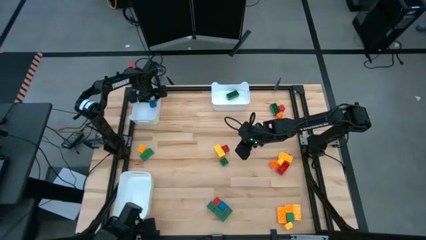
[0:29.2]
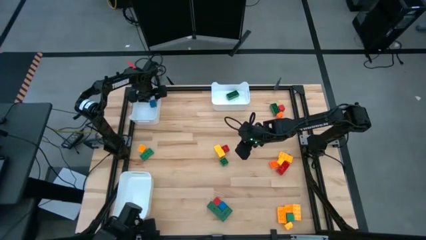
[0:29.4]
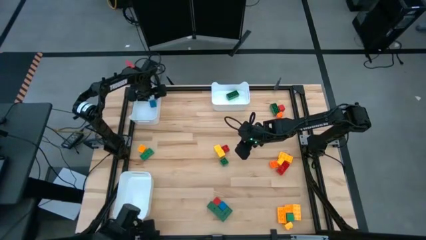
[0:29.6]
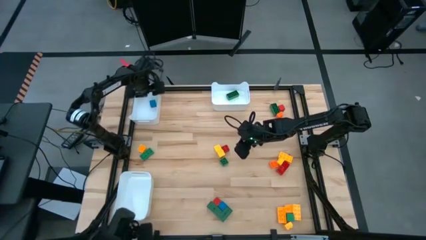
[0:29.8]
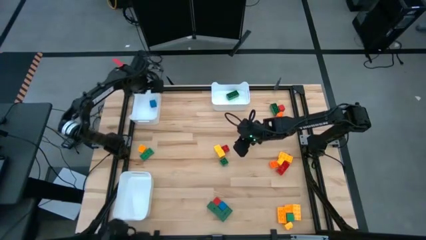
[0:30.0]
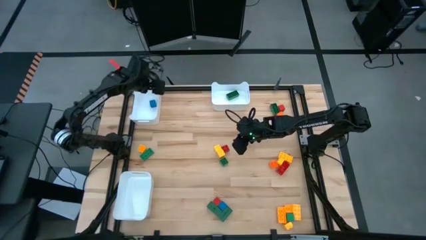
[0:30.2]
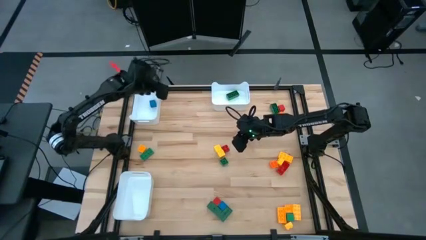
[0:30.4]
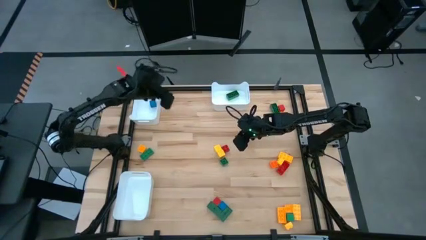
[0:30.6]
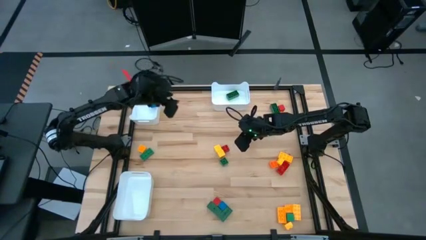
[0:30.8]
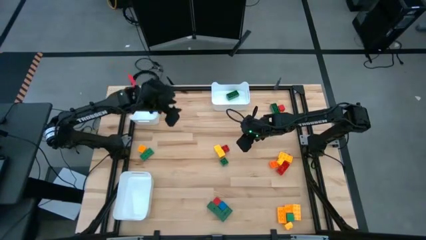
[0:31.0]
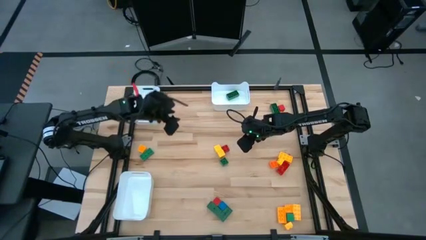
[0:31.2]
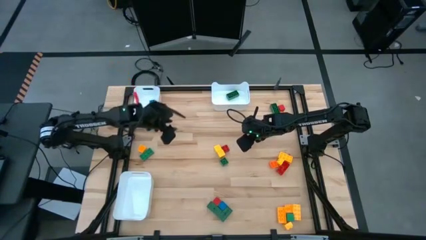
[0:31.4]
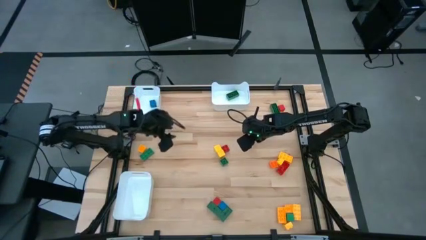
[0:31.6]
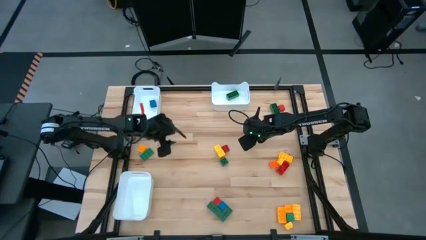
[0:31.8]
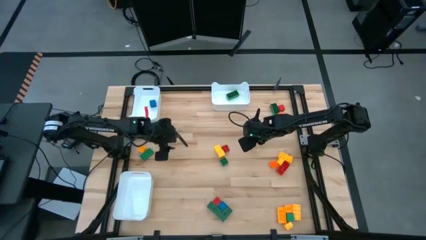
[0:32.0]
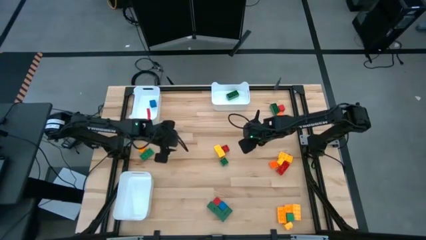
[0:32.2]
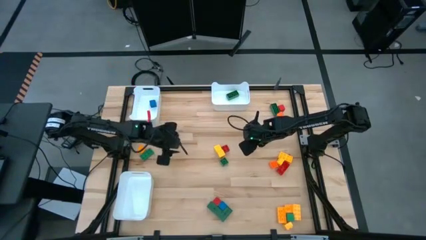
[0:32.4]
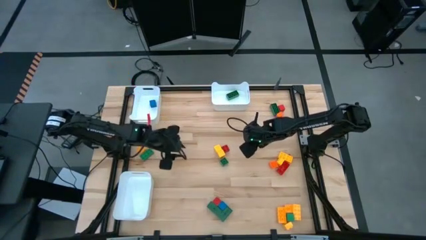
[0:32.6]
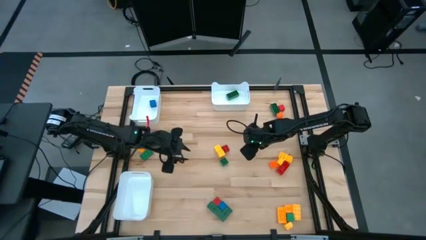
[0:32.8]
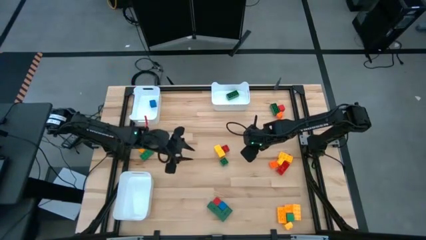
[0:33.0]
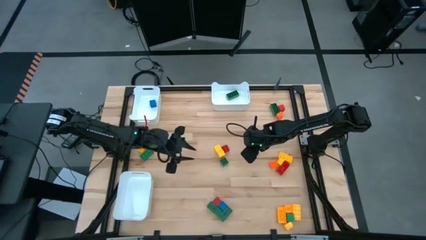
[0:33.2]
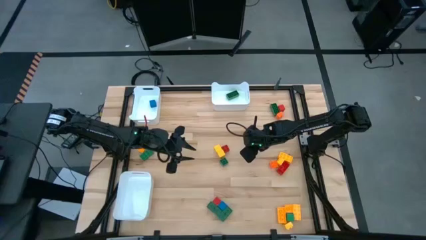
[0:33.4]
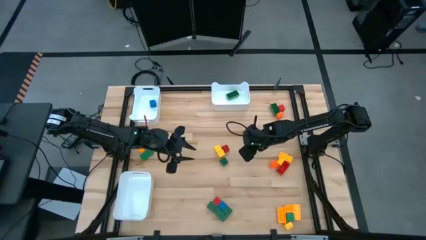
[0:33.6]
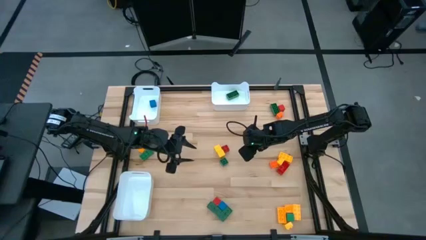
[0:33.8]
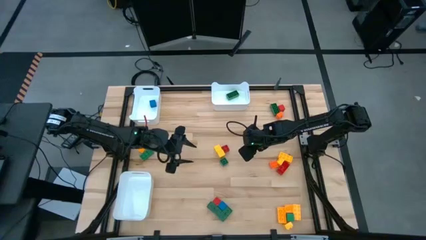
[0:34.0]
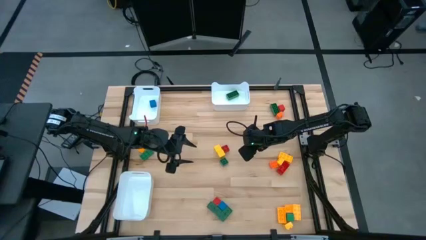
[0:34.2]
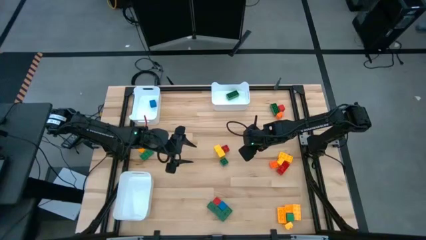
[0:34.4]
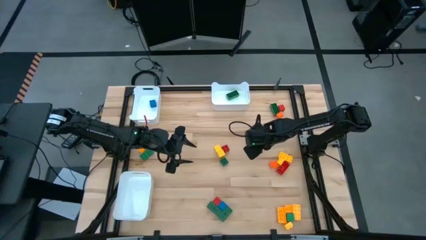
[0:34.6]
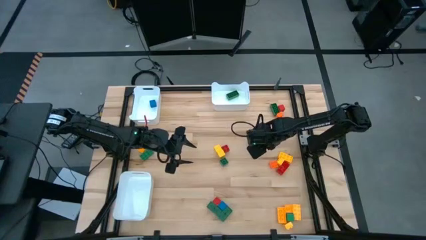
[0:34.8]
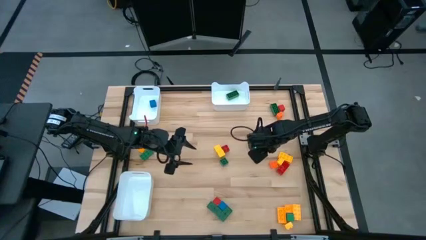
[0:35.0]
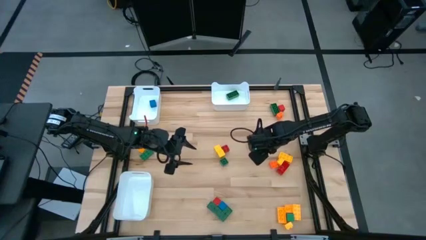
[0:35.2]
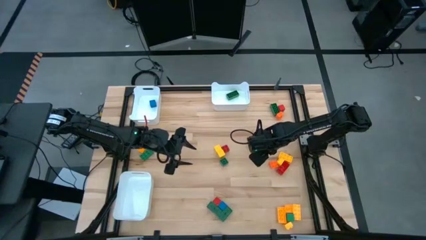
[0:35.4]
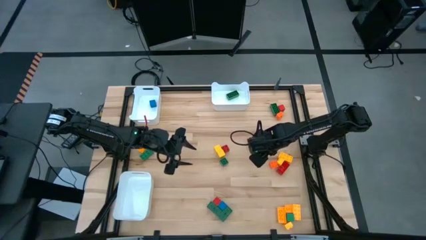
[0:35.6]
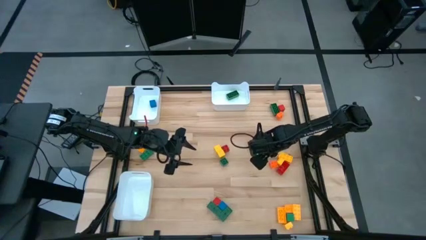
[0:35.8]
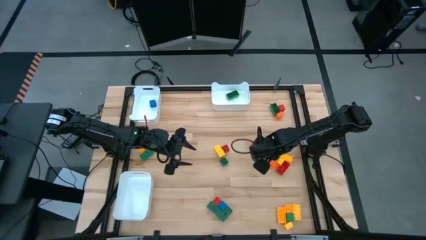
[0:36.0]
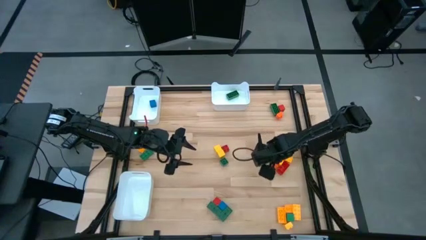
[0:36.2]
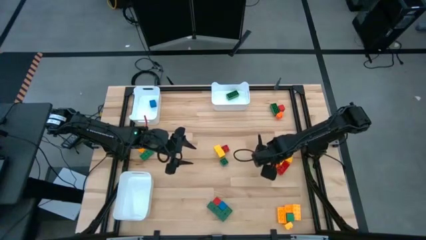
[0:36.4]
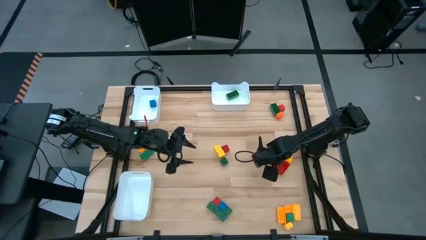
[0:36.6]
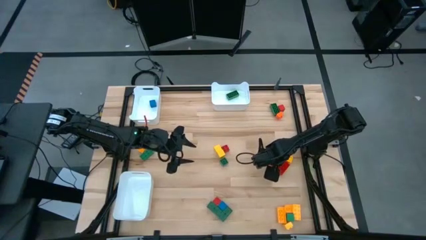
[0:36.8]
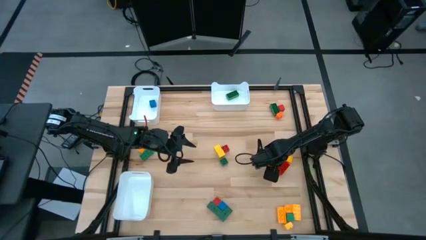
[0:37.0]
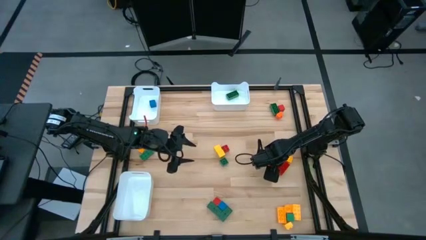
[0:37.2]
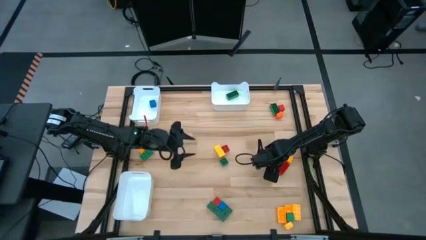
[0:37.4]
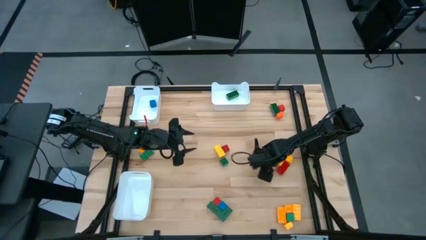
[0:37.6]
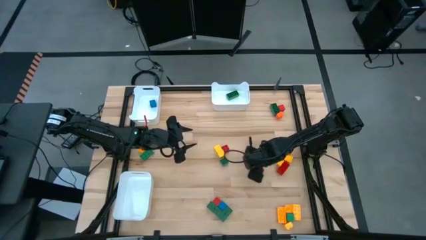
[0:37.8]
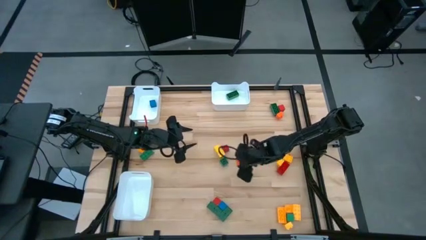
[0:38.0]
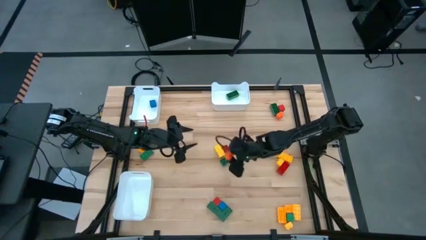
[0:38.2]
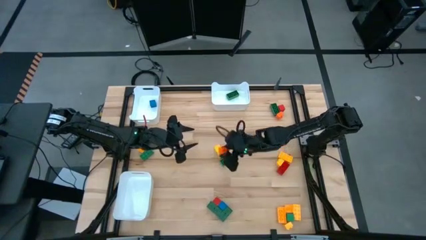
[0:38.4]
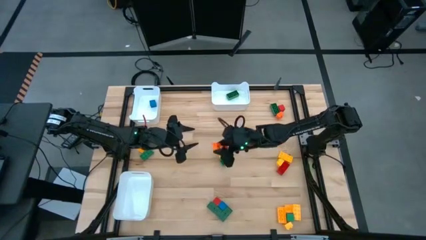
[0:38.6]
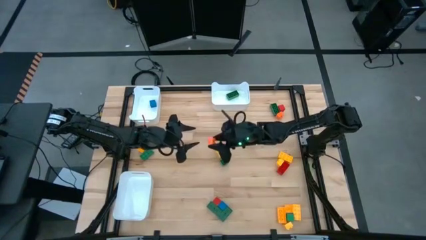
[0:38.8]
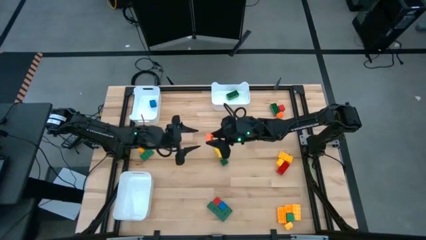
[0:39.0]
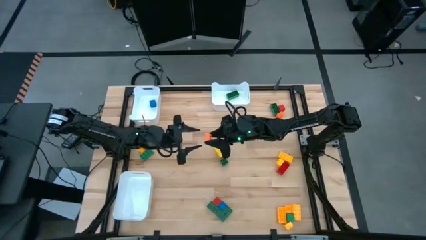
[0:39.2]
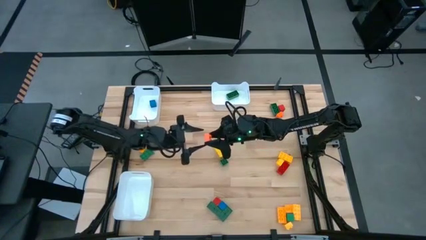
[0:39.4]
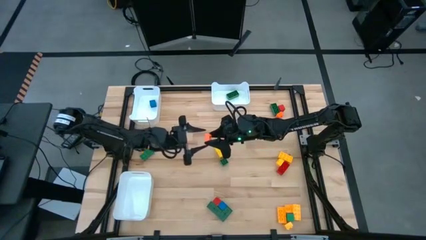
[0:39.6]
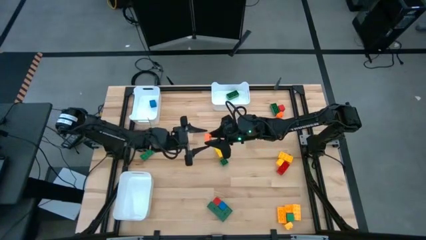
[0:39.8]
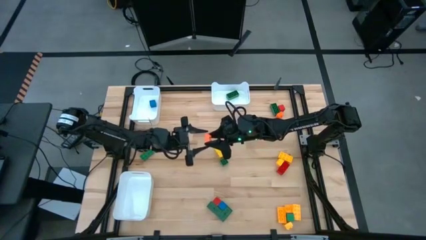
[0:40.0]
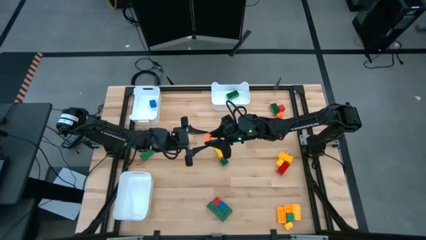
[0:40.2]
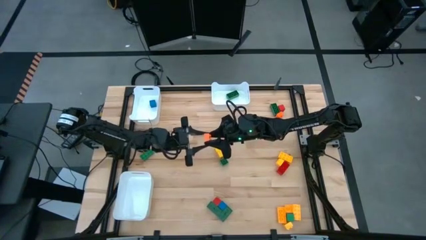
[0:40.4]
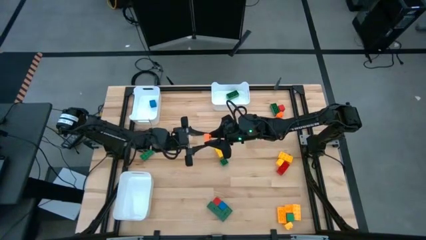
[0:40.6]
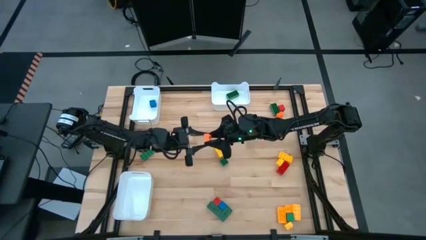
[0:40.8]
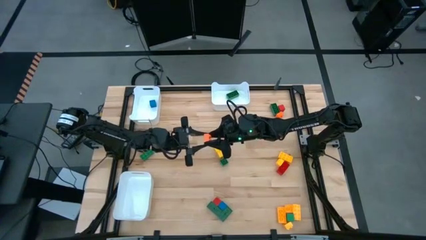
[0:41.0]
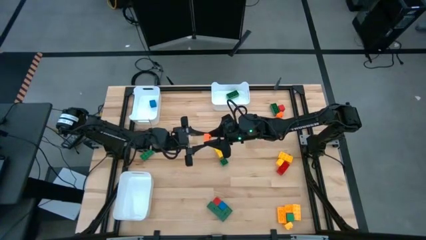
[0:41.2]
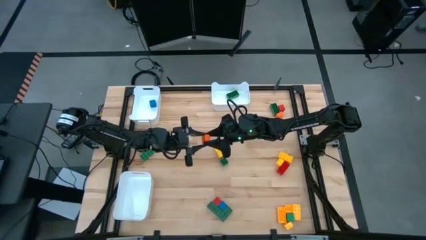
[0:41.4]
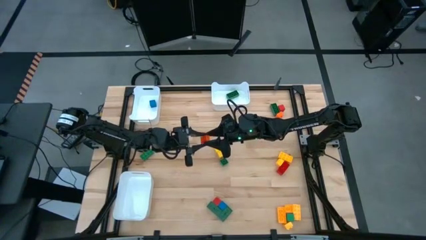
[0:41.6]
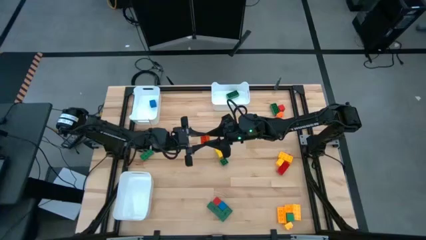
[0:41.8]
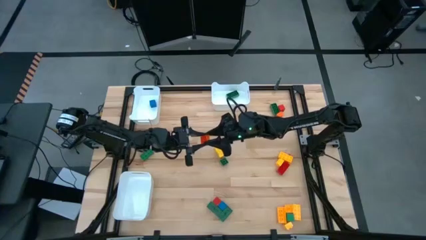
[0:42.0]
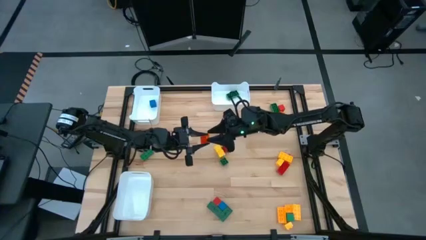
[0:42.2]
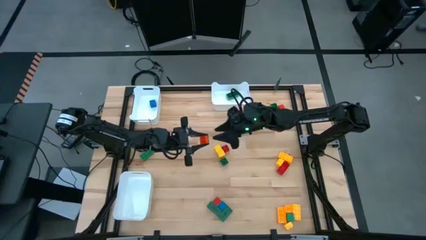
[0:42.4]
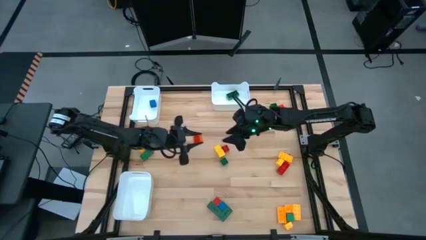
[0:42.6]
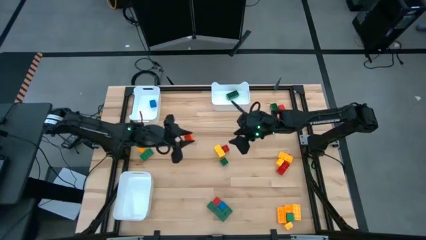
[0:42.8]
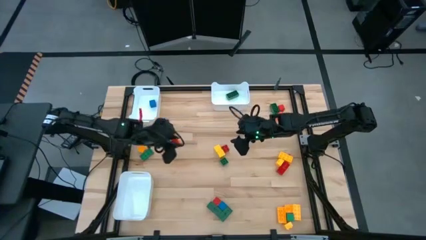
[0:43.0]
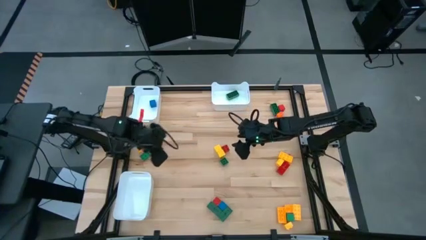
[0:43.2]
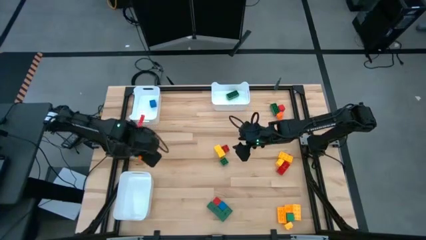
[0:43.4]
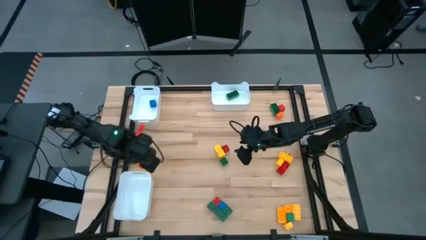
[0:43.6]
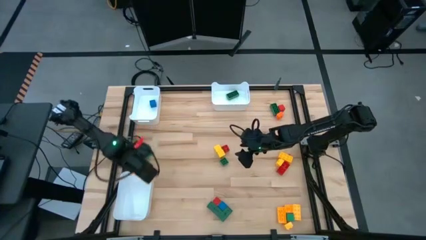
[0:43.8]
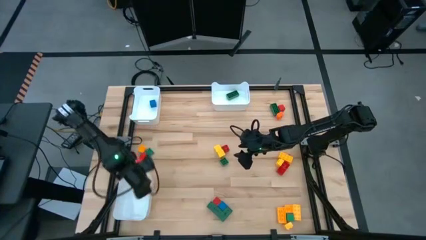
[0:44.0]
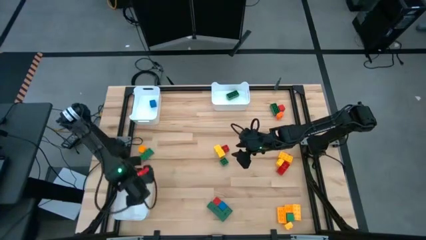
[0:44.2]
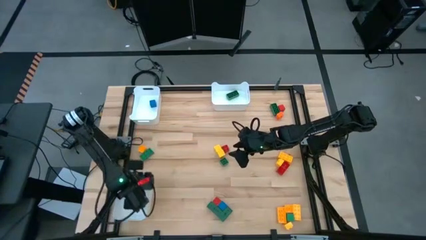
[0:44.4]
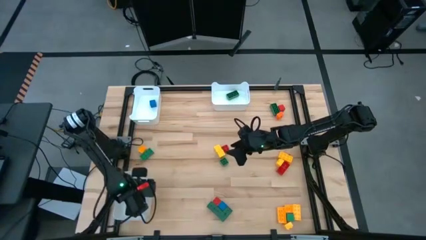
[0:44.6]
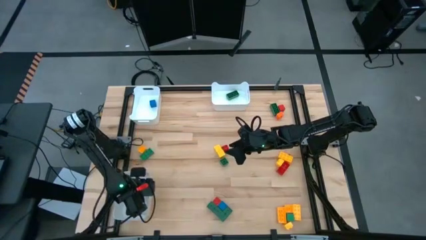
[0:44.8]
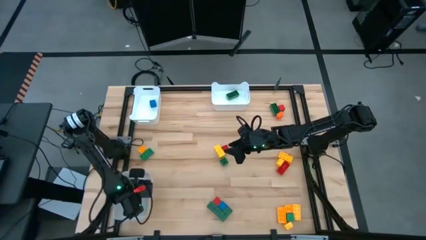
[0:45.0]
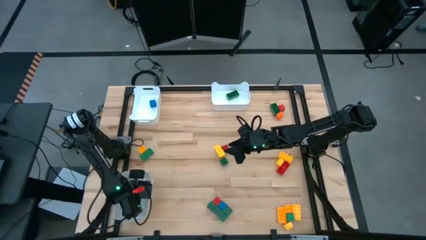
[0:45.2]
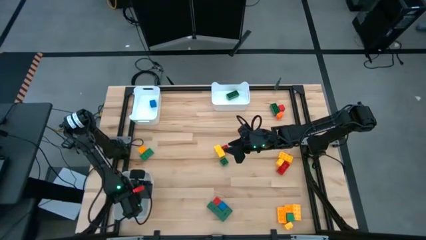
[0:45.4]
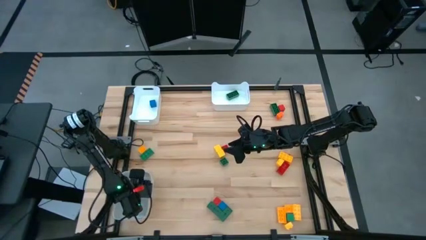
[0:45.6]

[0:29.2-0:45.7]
Task: Sort blocks by size
Put the orange 4 stud game piece into the bottom white bin
